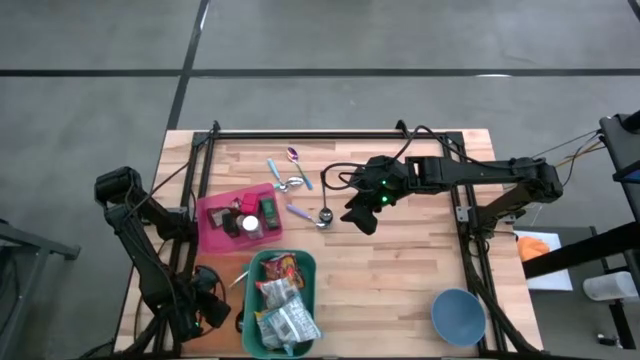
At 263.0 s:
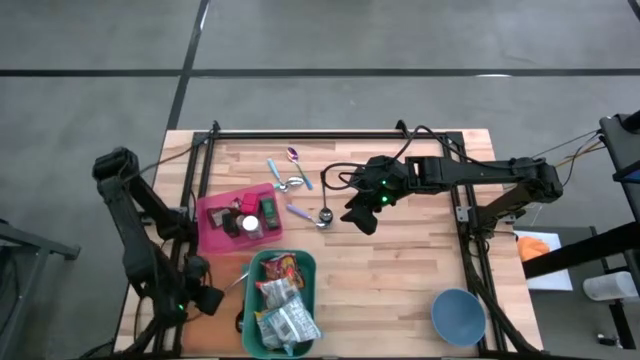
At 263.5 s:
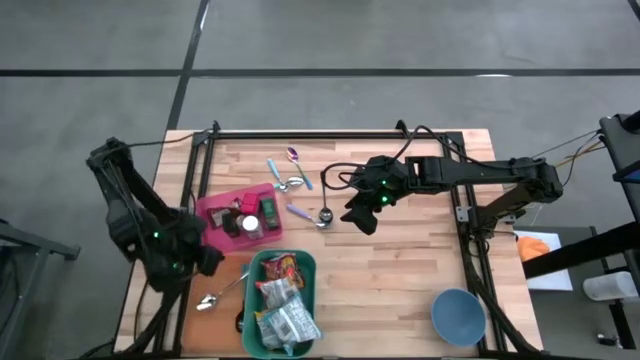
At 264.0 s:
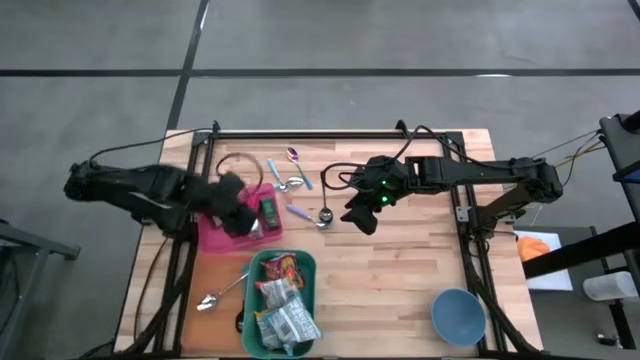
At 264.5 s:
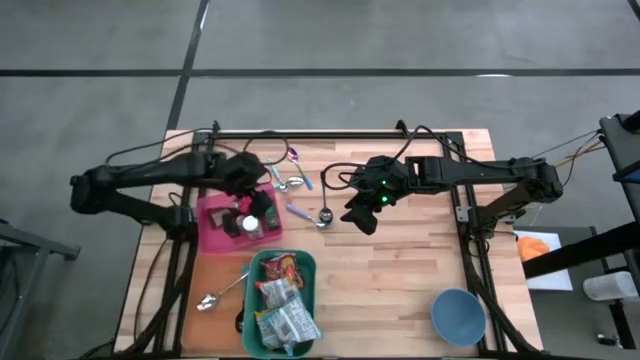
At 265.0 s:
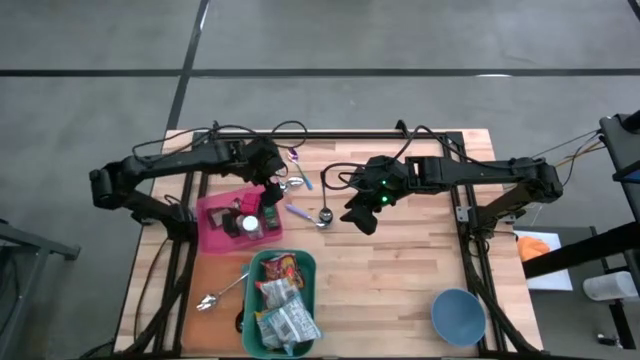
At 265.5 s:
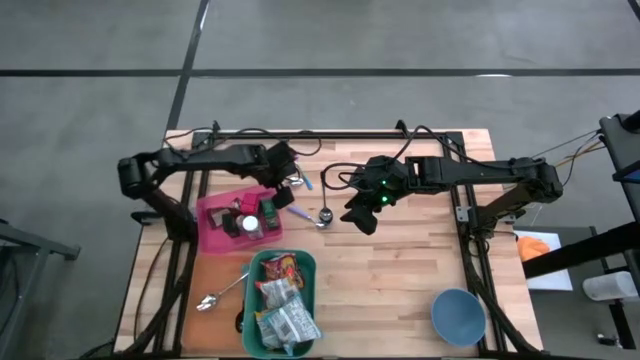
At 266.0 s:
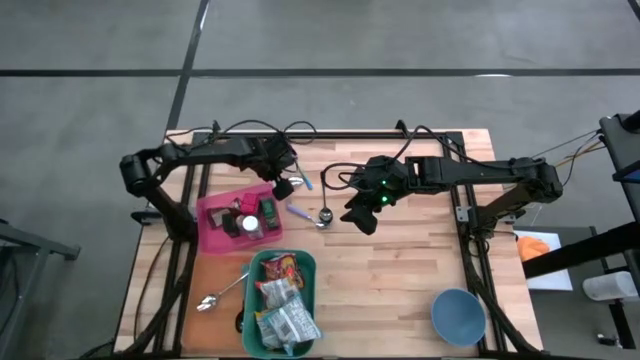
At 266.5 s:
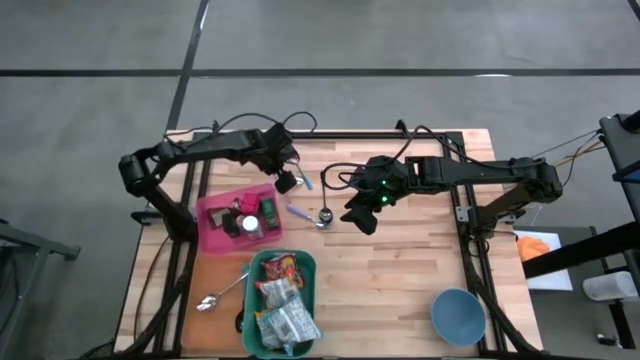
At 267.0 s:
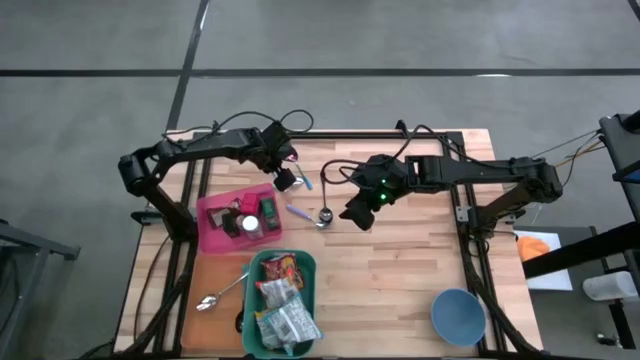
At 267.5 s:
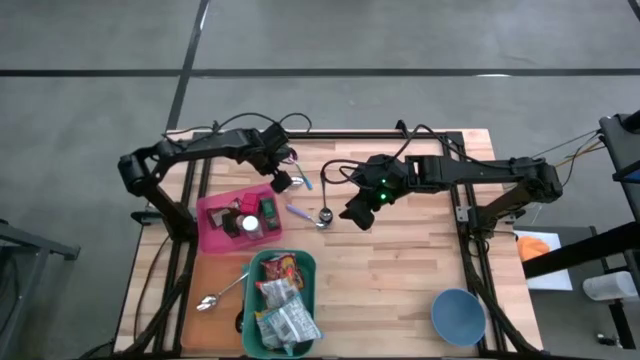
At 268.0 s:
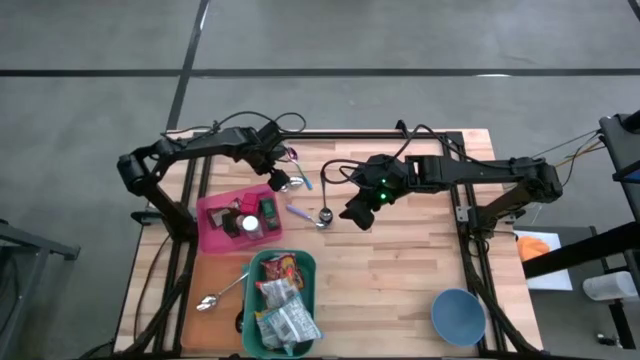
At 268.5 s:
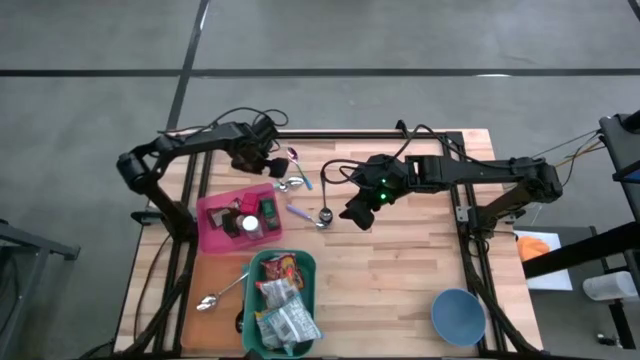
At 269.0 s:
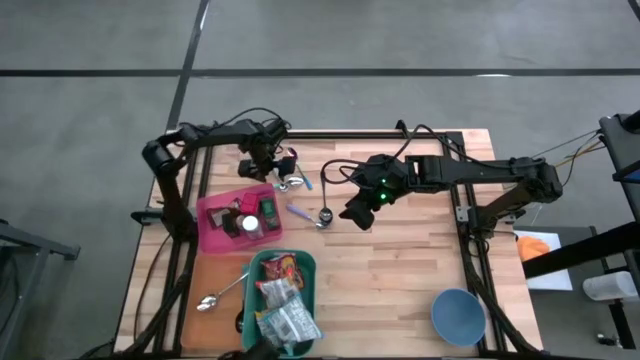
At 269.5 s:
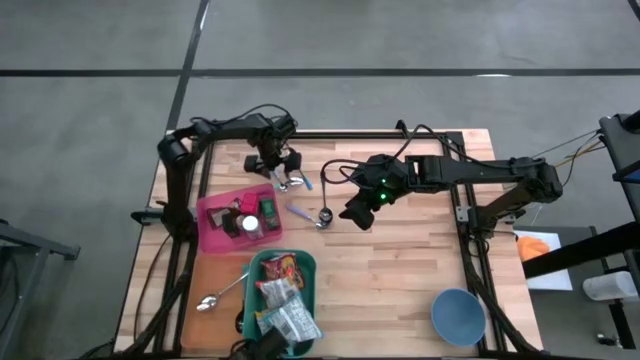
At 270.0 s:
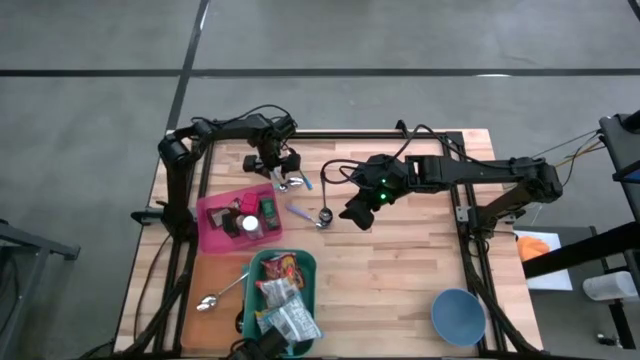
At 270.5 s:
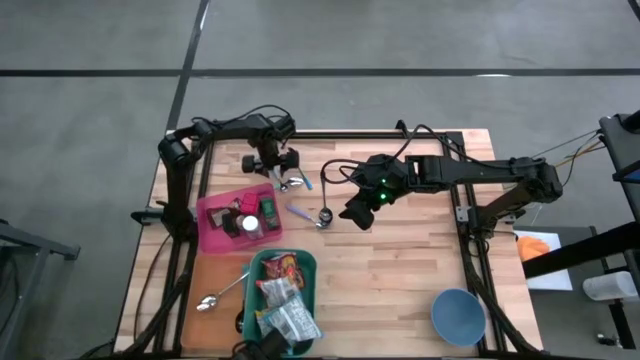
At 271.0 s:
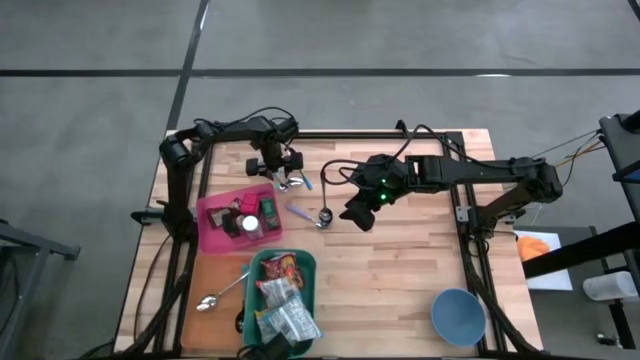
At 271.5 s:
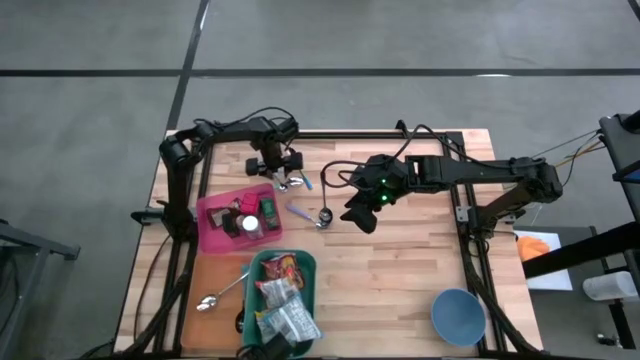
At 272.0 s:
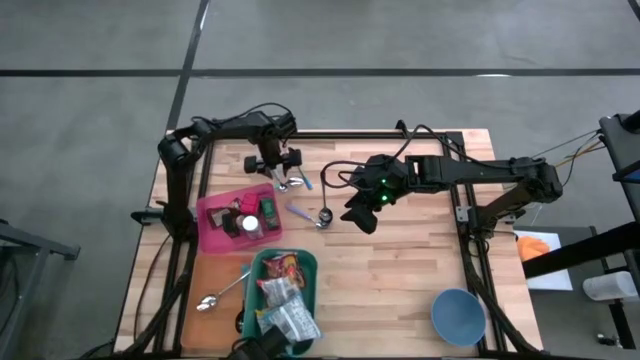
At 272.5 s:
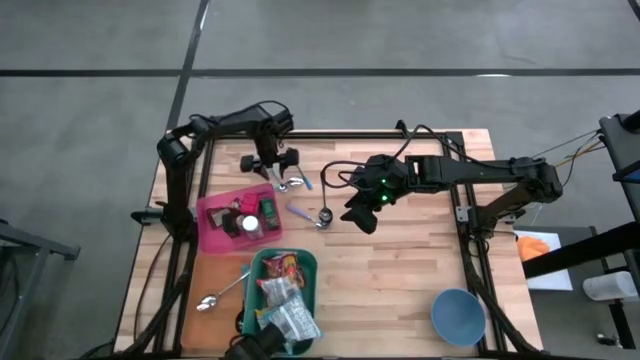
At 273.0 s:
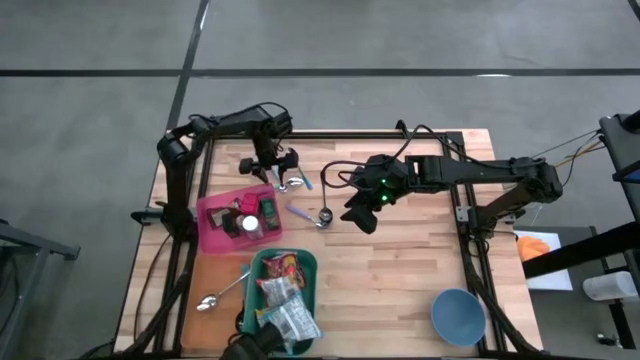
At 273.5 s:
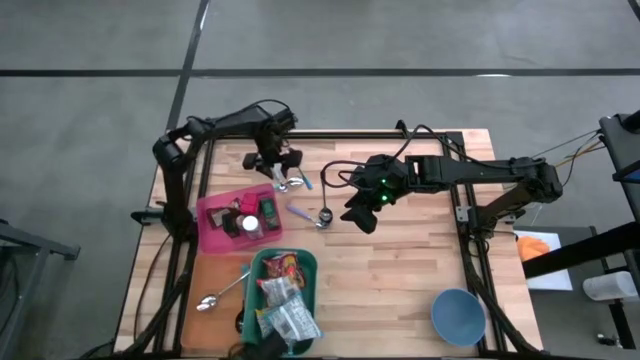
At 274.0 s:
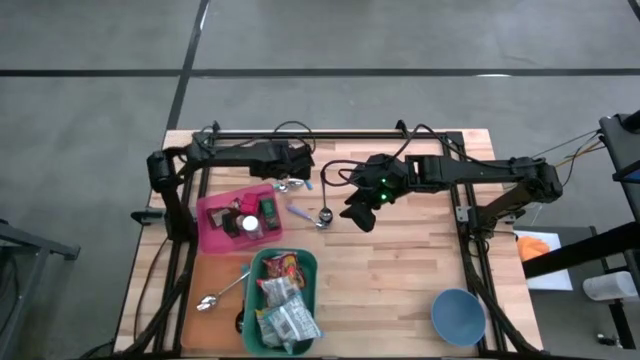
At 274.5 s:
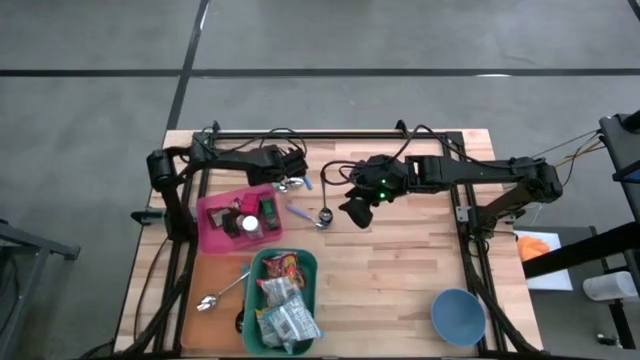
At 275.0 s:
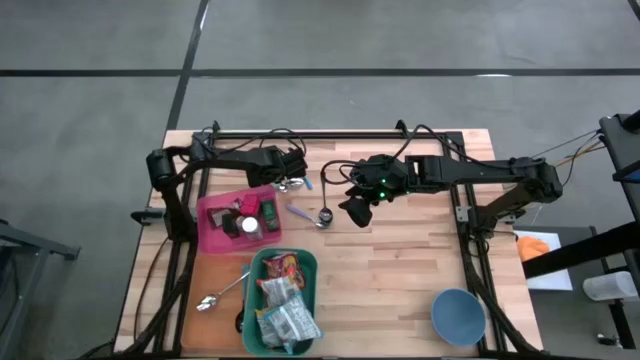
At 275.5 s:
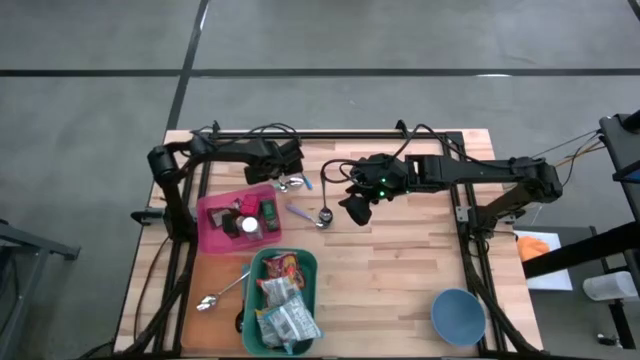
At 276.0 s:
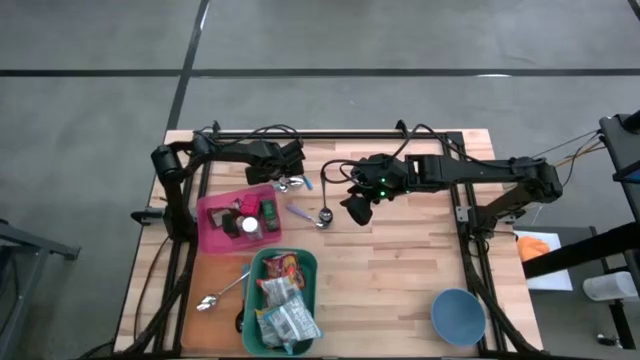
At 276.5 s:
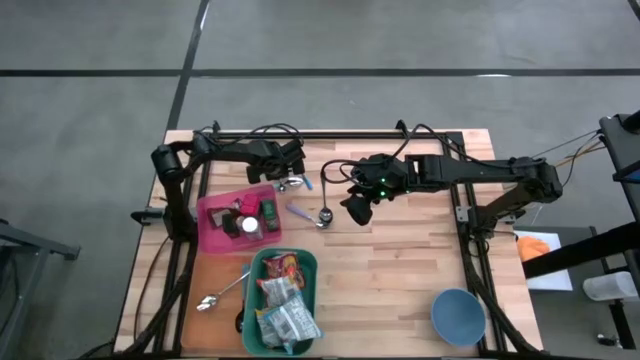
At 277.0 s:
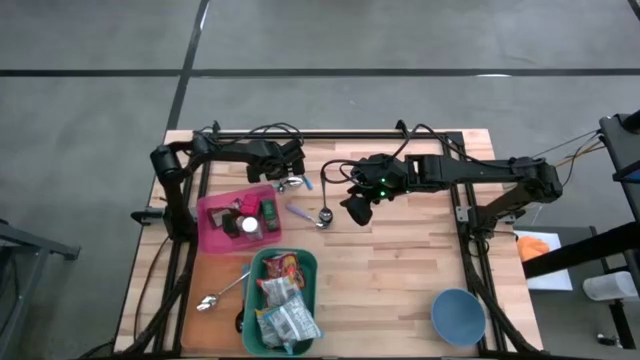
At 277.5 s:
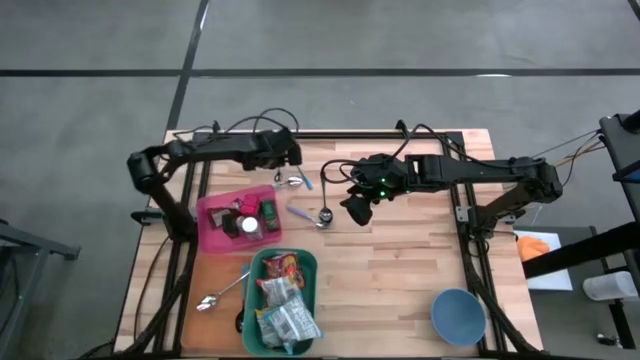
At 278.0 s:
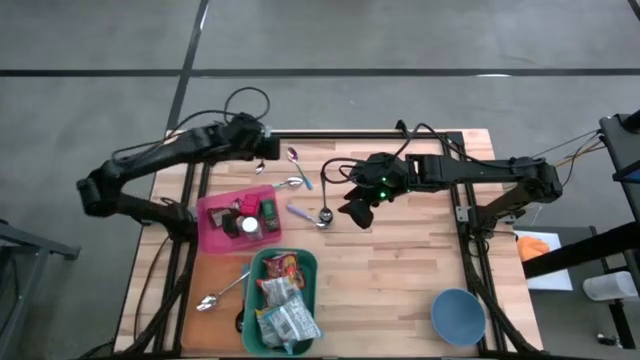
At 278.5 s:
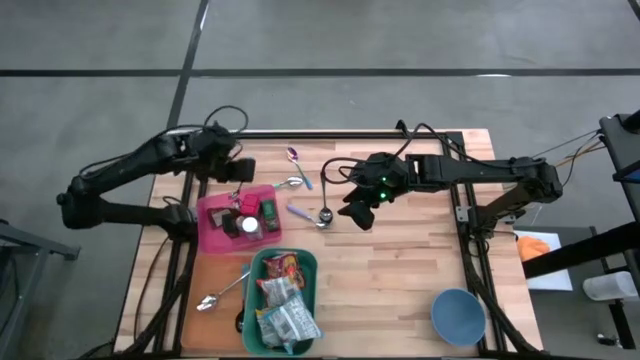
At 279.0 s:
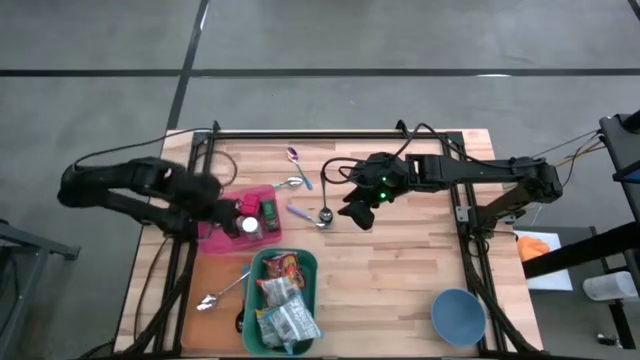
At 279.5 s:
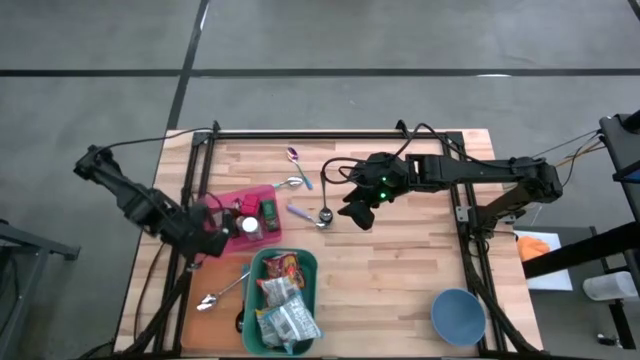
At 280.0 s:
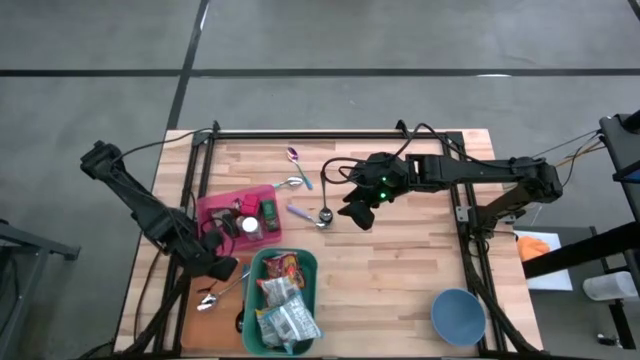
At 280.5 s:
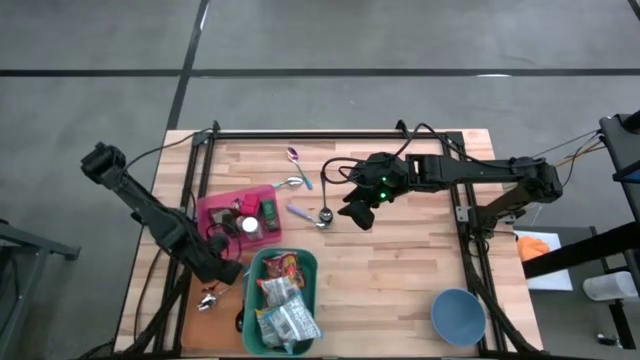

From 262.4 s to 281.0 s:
Put the light blue spoon into the orange bin
